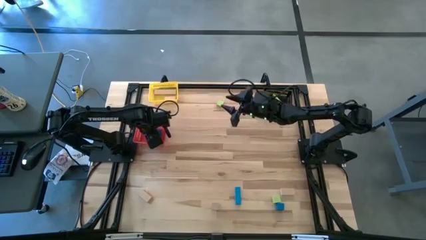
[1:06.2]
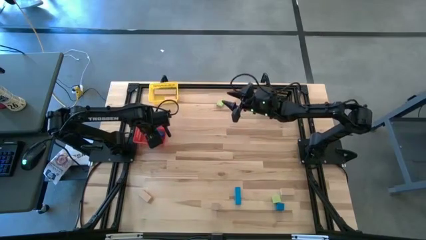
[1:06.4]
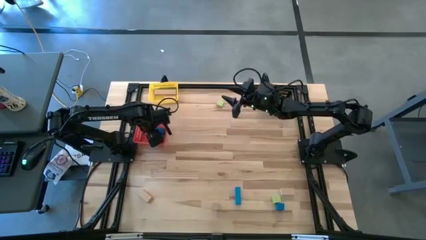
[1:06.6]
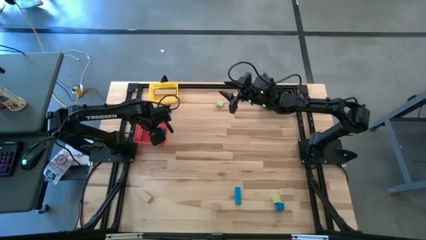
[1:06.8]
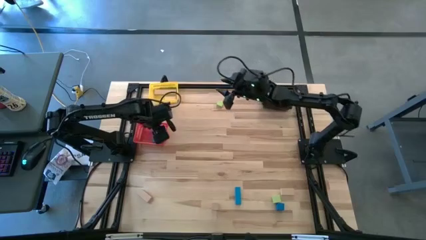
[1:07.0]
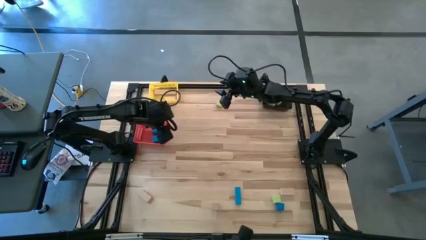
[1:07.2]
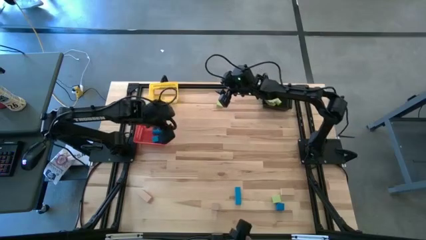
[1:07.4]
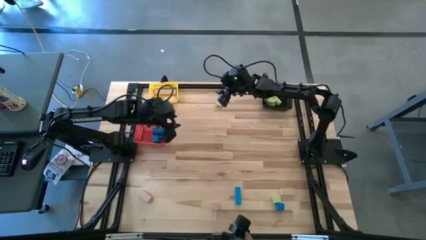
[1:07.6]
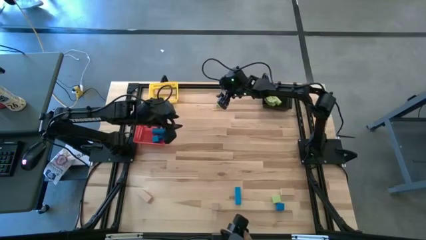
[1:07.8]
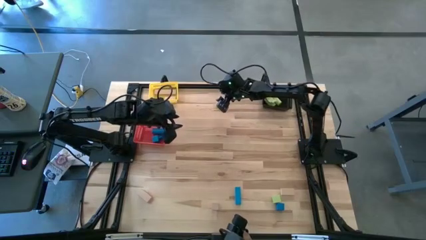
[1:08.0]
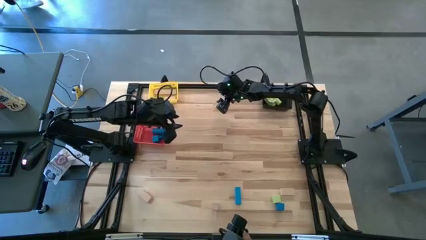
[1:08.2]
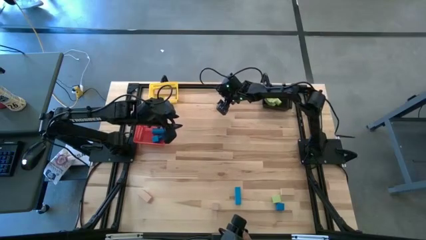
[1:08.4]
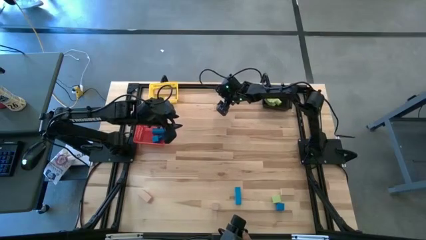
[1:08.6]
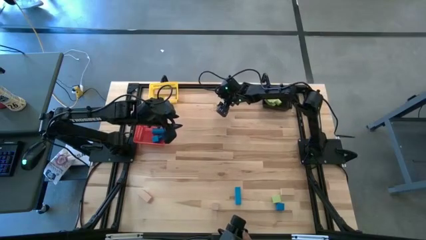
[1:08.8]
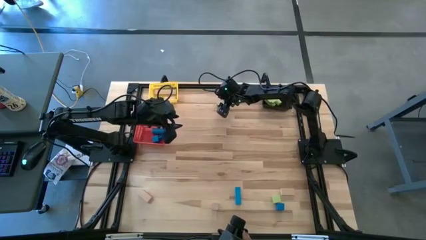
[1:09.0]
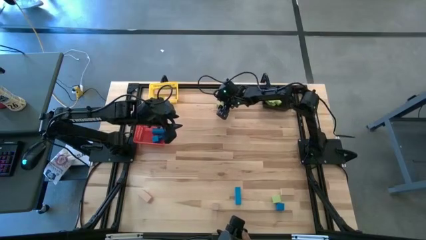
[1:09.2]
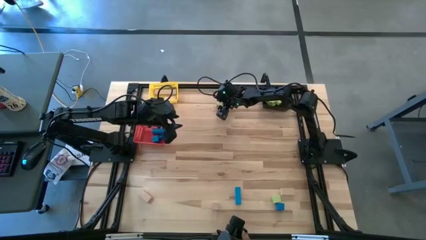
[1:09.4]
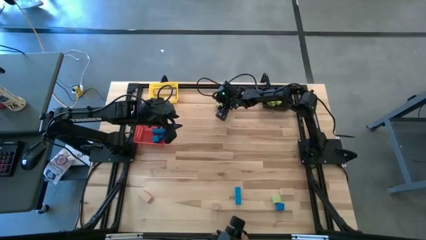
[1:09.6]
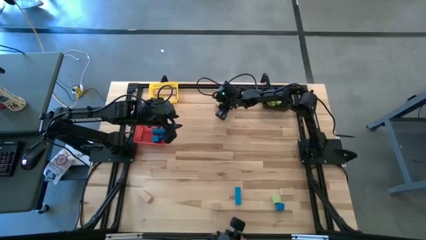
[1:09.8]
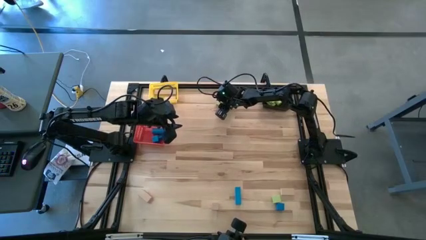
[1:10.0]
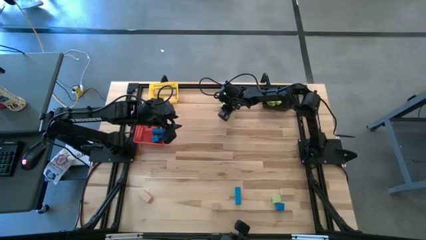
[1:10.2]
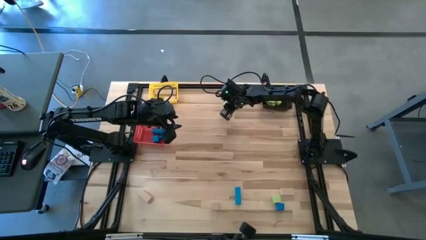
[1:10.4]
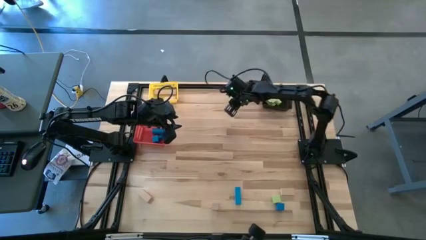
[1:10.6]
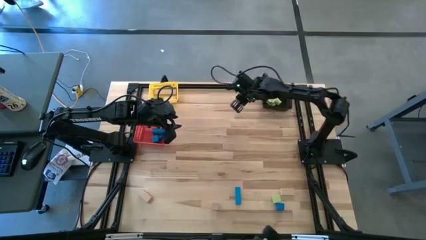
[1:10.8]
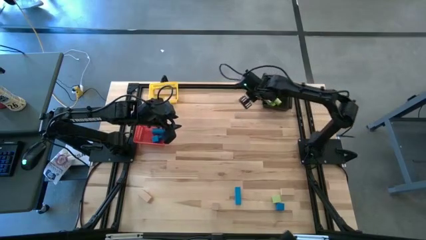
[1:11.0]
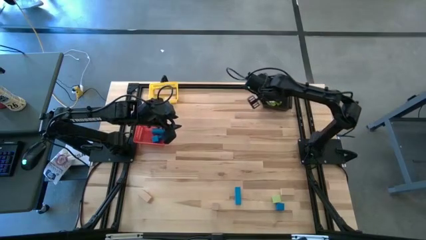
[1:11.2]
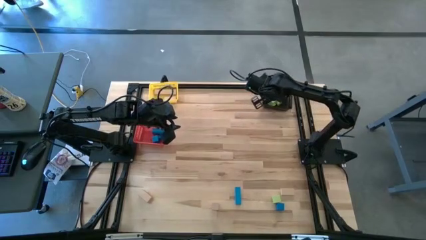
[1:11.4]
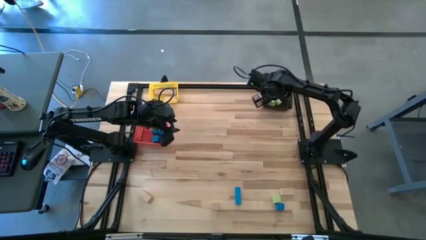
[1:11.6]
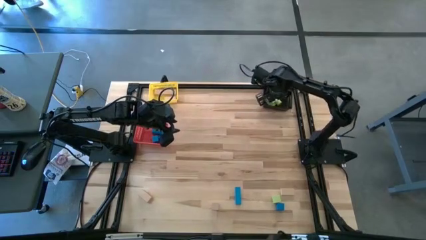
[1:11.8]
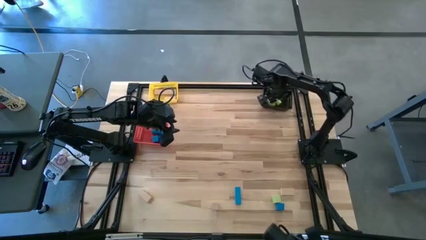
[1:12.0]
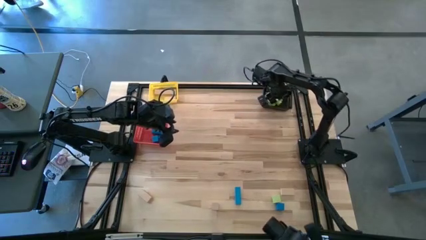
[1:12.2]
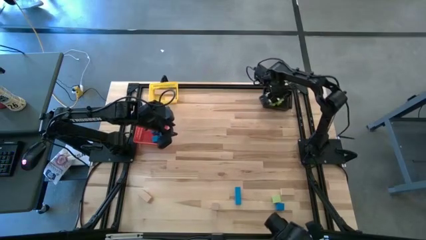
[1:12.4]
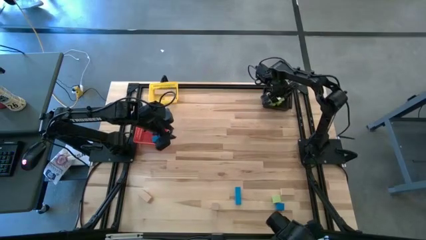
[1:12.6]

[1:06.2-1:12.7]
Task: Sort & place blocks by color
Put the green block into the black bin

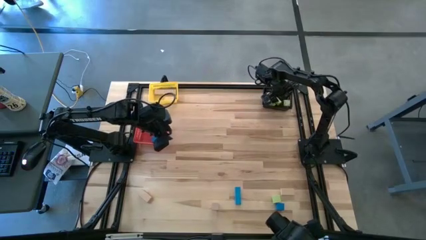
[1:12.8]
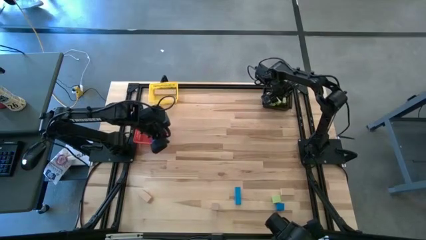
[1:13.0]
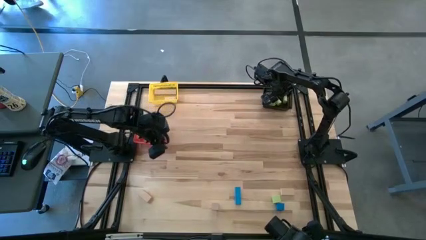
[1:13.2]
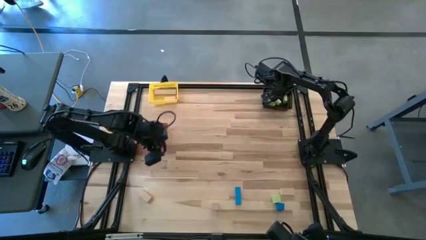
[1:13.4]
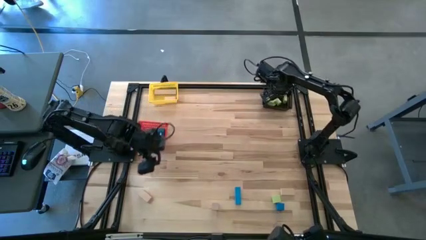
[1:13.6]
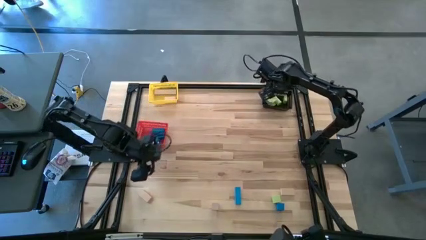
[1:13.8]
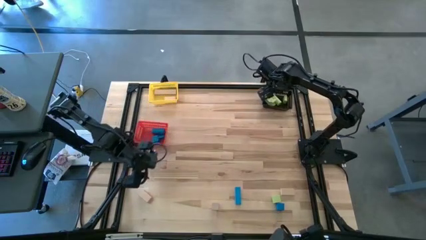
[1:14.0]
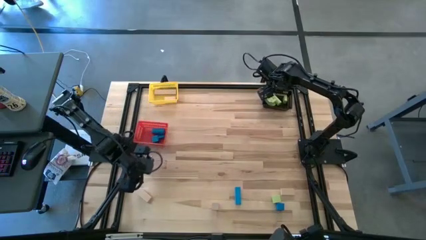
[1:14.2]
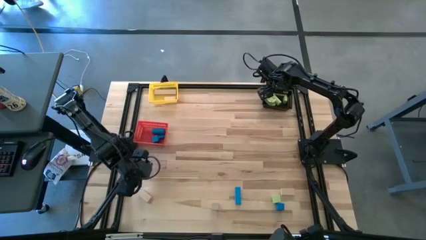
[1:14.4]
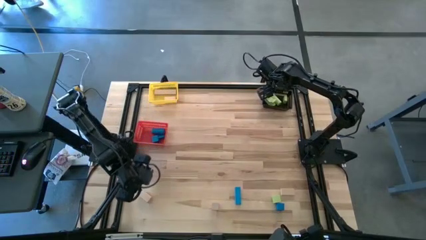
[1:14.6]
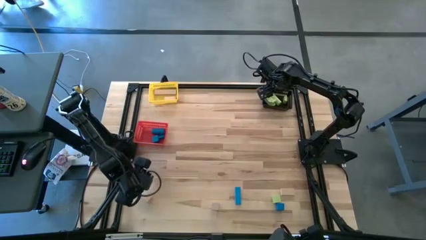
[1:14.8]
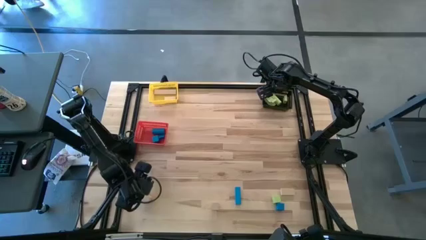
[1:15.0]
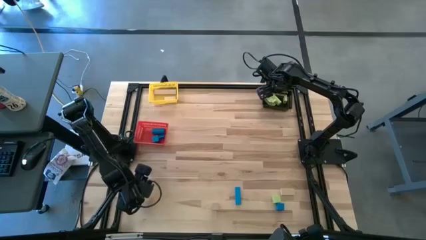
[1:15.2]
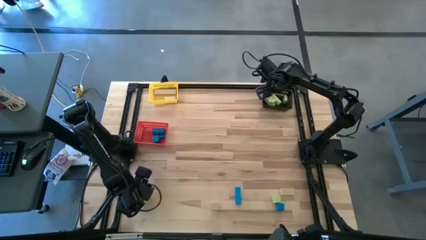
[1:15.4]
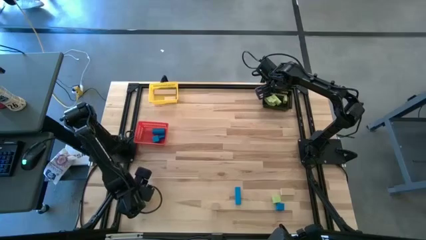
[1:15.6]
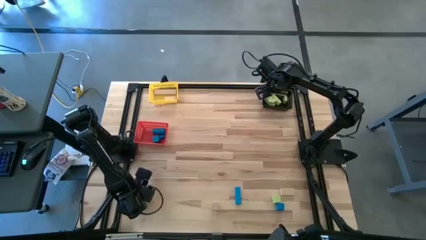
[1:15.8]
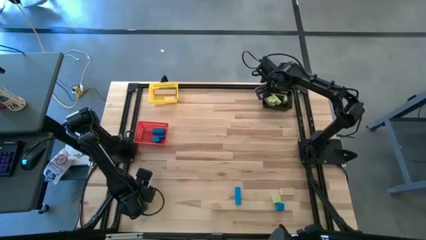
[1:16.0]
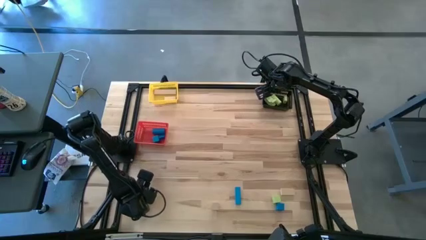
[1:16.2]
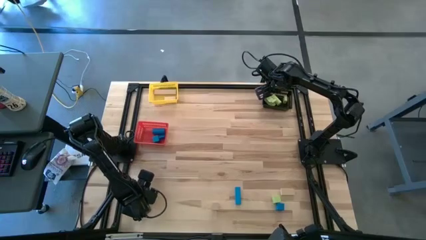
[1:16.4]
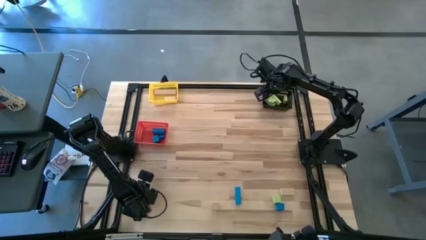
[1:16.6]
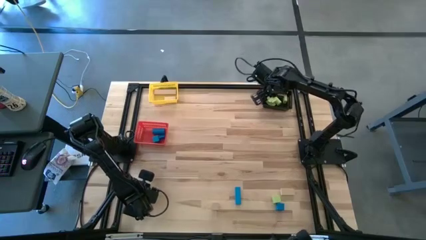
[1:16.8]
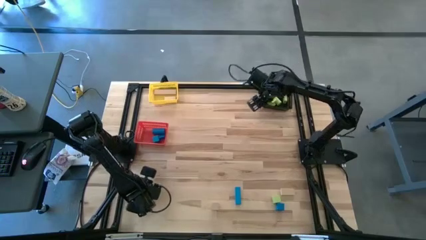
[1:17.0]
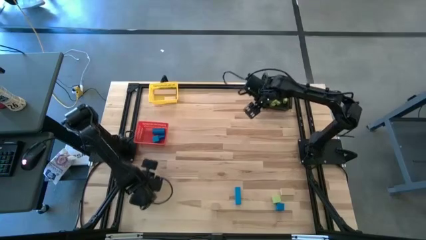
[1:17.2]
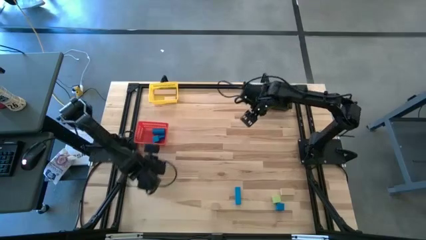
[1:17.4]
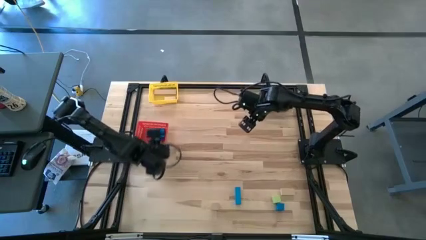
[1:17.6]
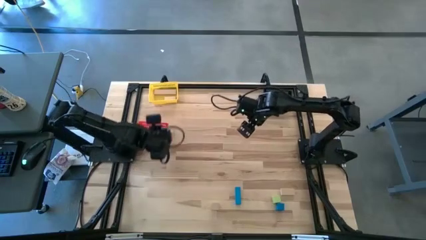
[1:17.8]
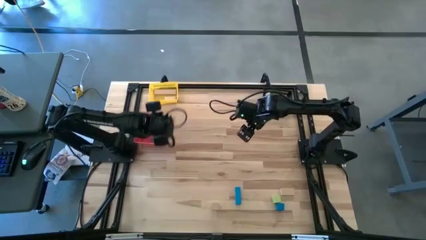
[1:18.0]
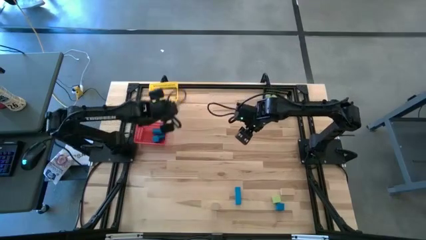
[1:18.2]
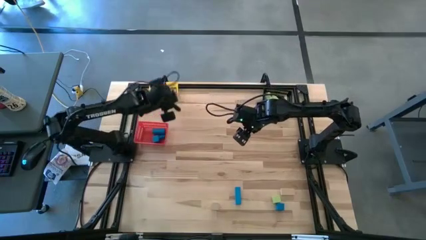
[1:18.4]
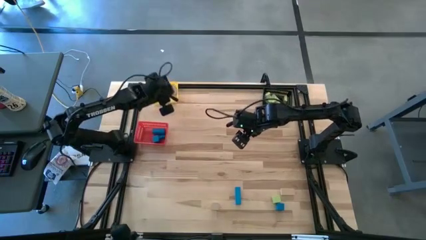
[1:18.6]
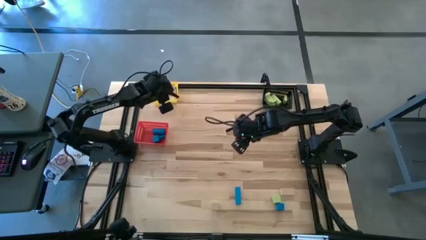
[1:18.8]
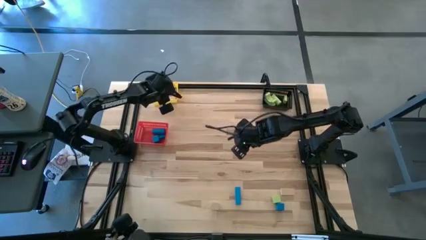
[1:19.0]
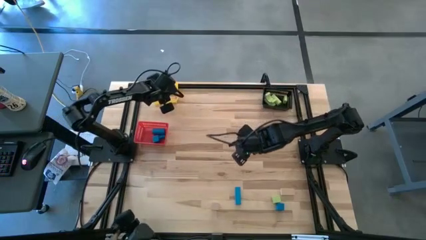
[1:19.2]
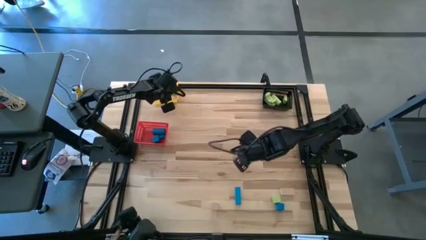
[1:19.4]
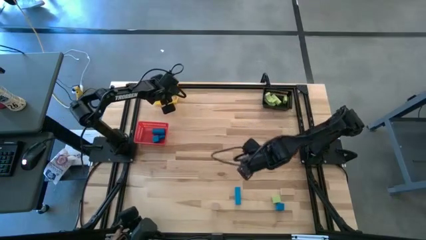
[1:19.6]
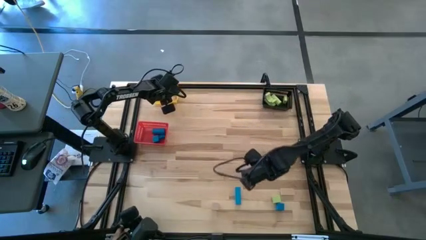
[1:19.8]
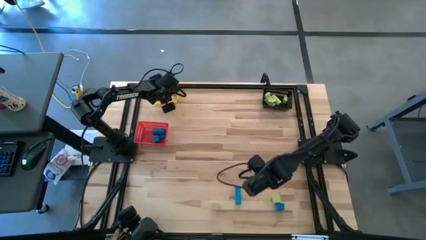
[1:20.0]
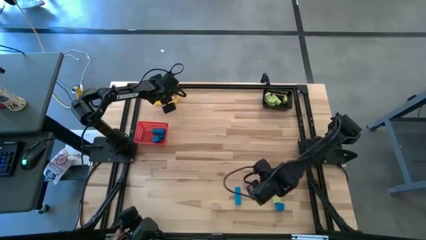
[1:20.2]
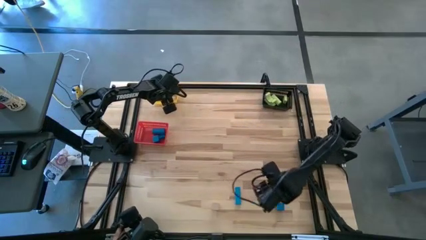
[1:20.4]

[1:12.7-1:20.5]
Put the brown block into the yellow bin

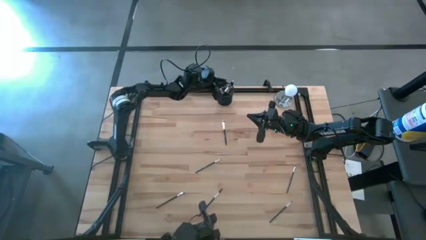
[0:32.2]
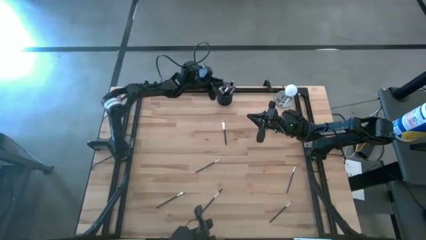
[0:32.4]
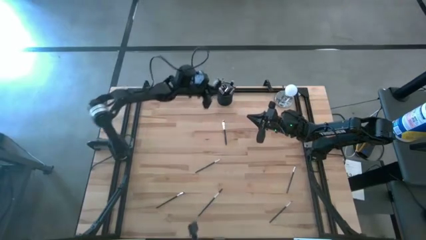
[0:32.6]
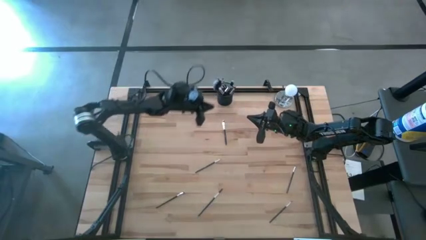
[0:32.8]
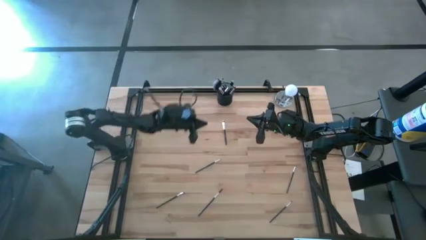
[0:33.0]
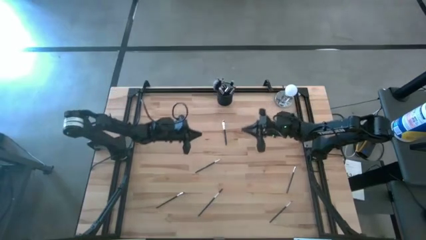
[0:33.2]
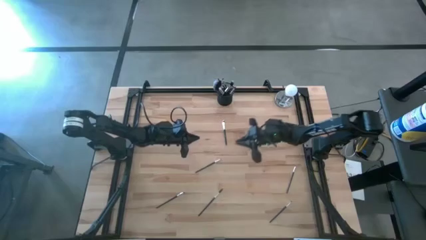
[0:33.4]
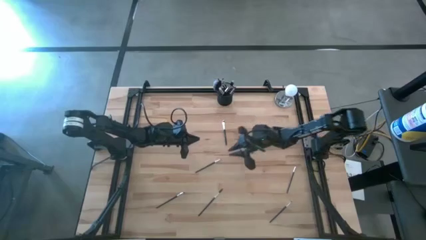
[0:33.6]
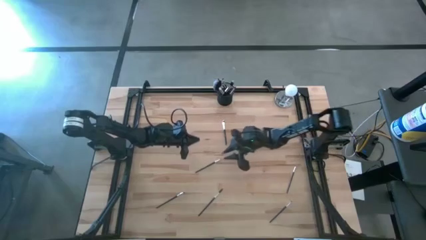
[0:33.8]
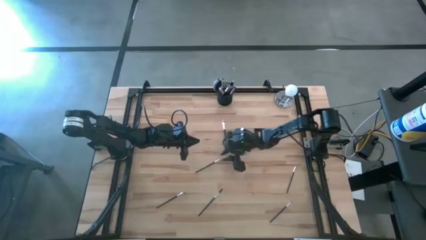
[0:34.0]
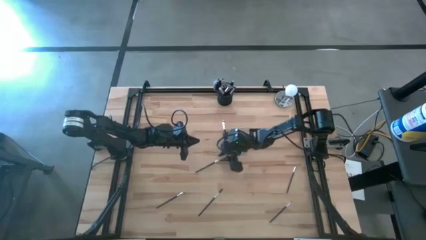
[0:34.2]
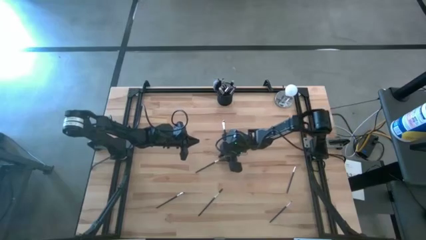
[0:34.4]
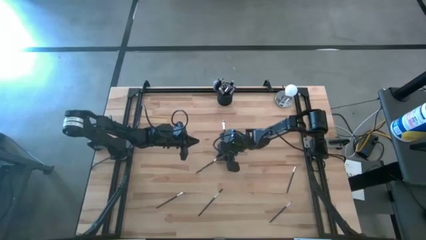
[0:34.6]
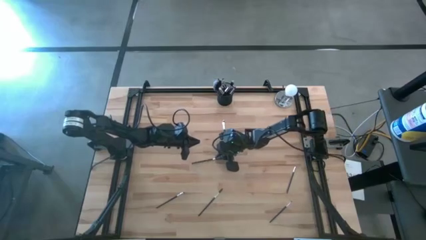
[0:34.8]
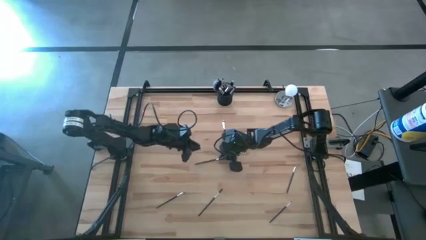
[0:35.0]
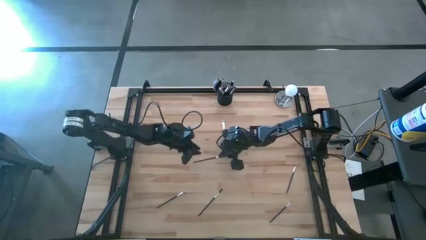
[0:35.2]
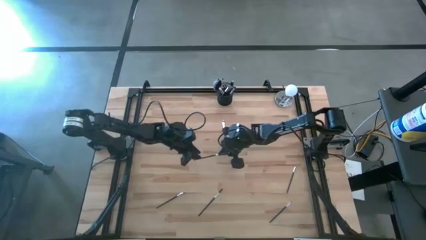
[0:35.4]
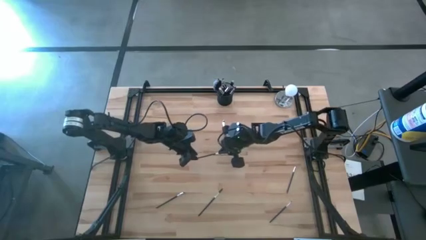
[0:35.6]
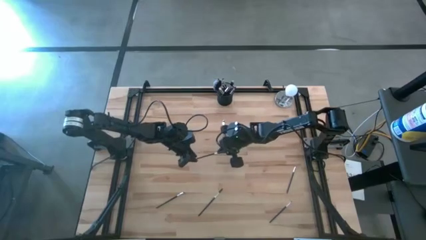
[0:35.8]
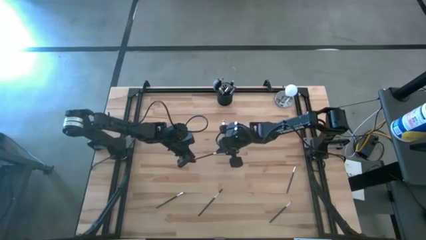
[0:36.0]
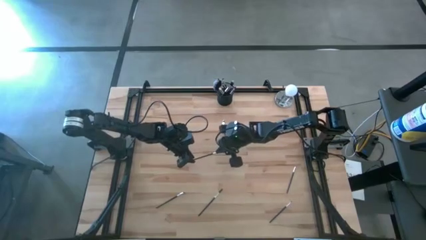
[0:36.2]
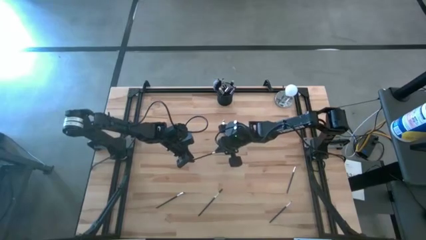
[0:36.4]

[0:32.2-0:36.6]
Task: Put items in baskets/containers
Put the black liner brush into the black pen holder
